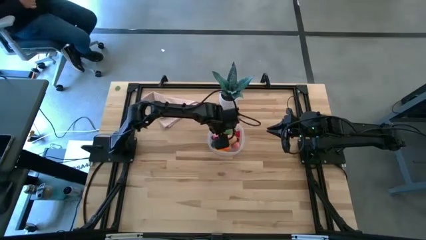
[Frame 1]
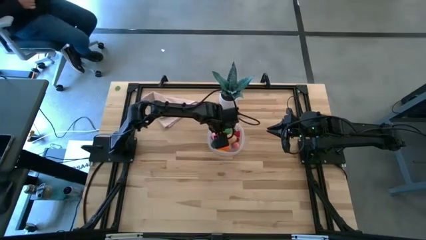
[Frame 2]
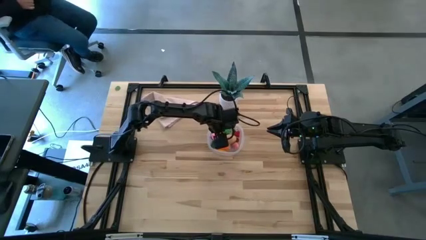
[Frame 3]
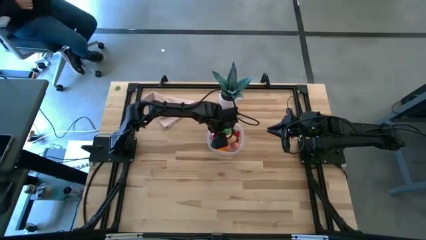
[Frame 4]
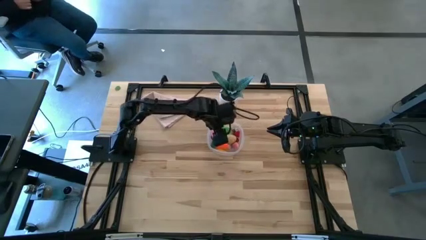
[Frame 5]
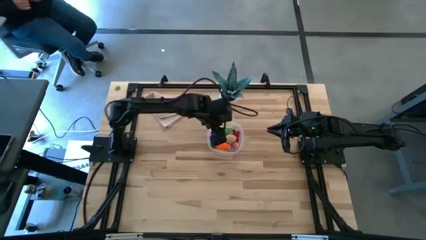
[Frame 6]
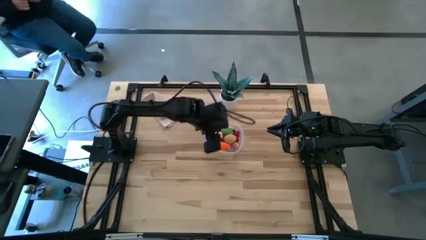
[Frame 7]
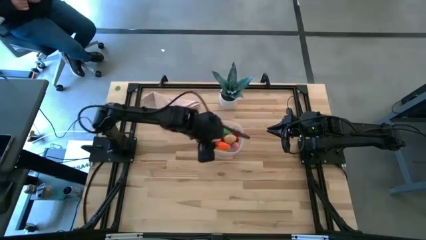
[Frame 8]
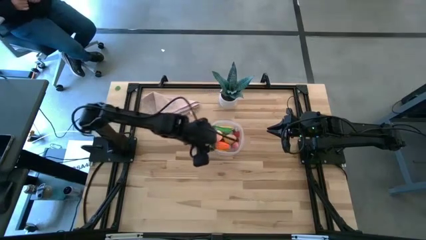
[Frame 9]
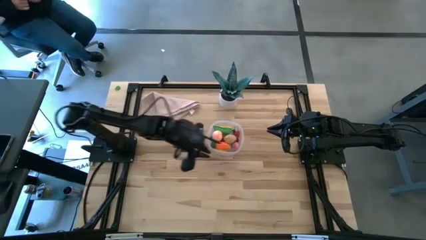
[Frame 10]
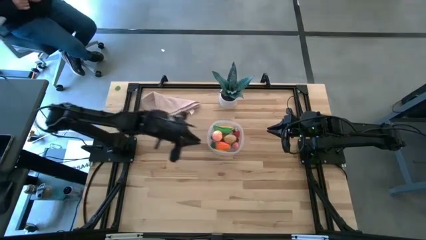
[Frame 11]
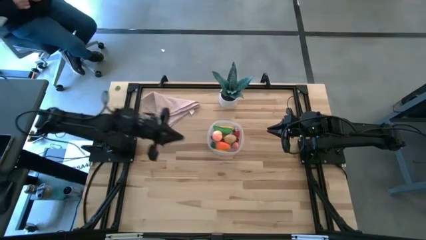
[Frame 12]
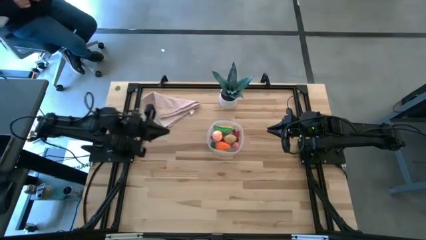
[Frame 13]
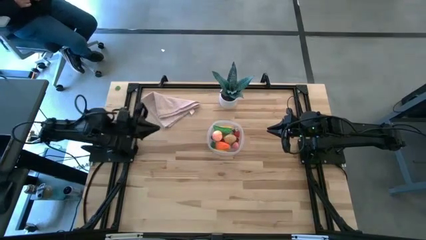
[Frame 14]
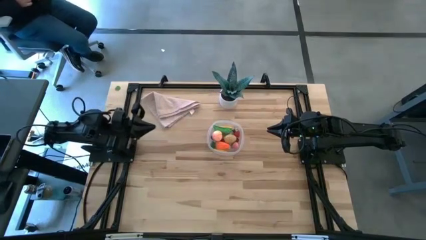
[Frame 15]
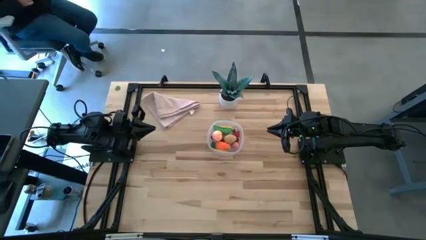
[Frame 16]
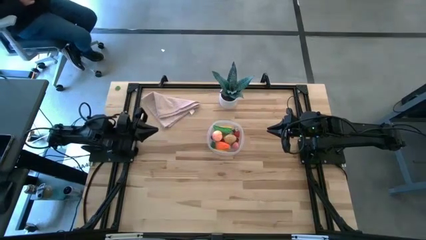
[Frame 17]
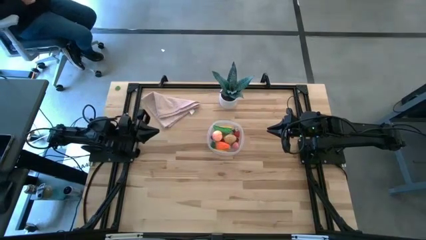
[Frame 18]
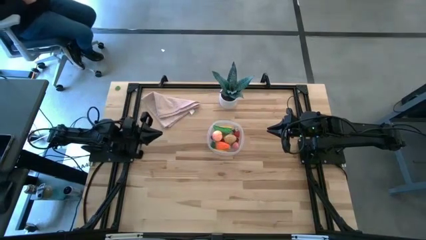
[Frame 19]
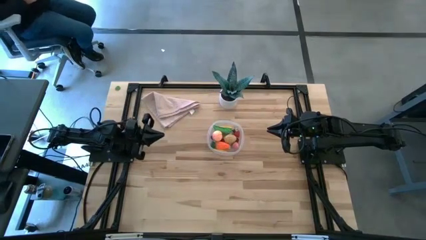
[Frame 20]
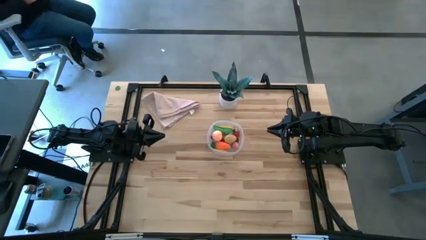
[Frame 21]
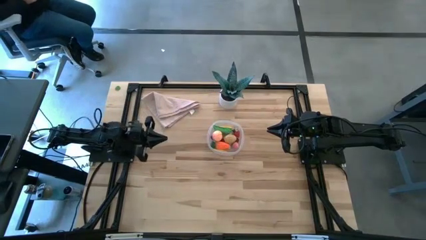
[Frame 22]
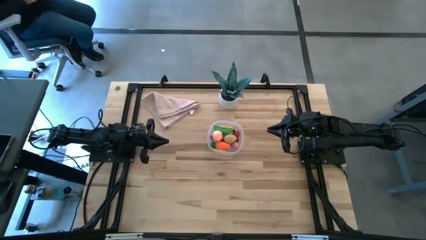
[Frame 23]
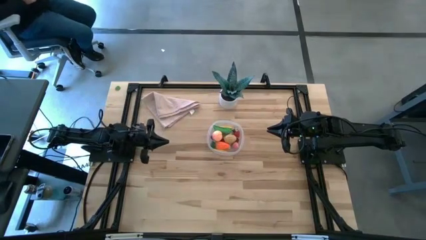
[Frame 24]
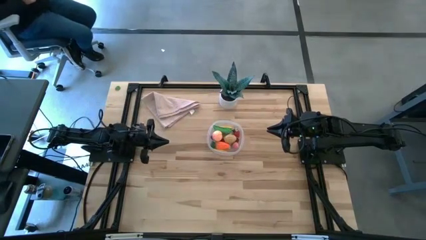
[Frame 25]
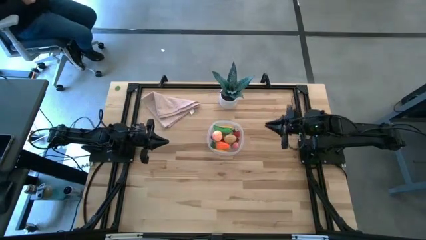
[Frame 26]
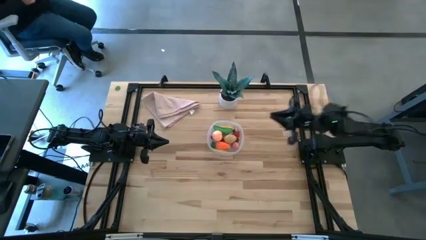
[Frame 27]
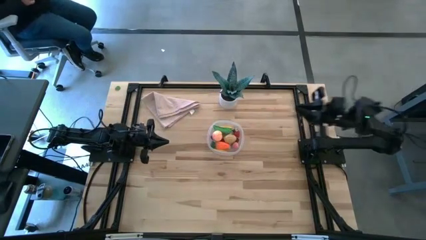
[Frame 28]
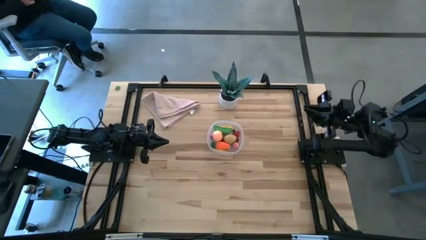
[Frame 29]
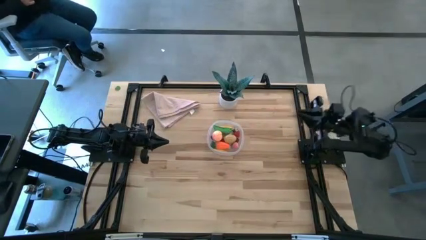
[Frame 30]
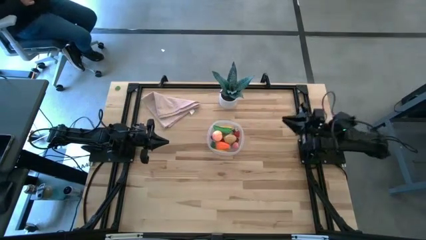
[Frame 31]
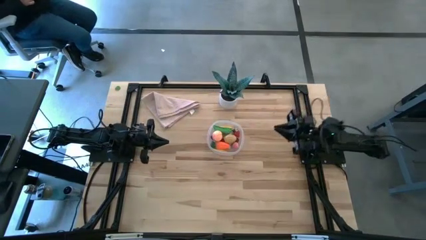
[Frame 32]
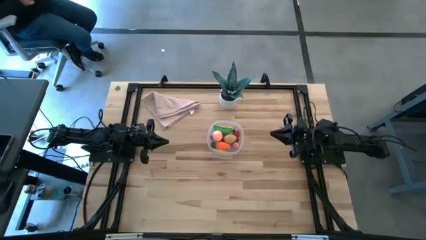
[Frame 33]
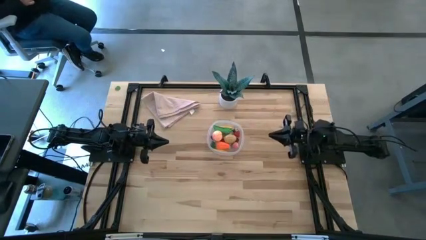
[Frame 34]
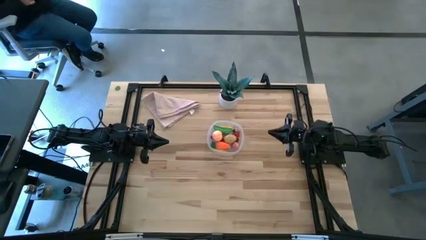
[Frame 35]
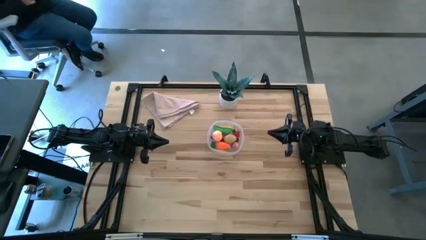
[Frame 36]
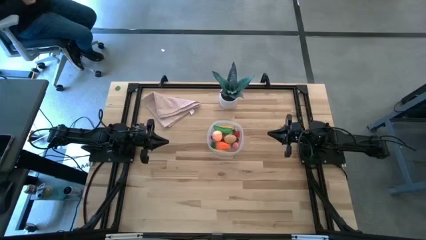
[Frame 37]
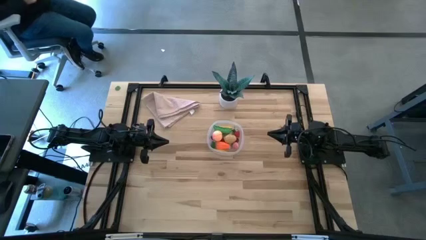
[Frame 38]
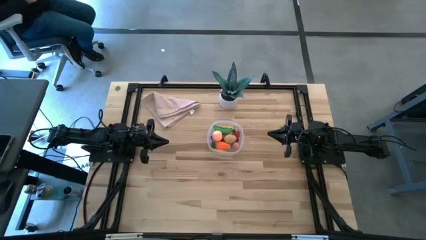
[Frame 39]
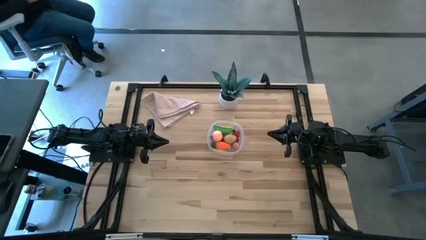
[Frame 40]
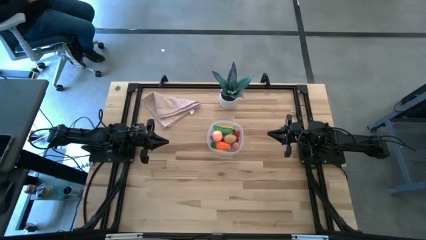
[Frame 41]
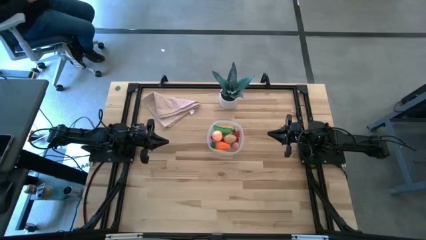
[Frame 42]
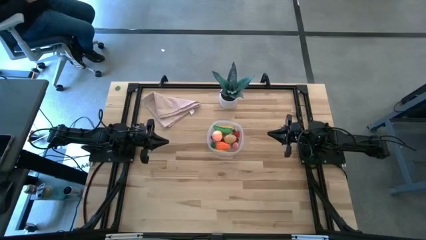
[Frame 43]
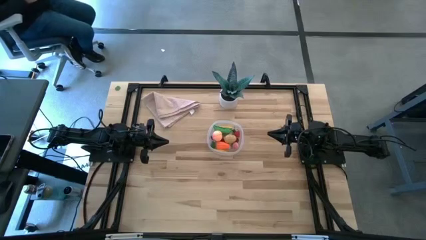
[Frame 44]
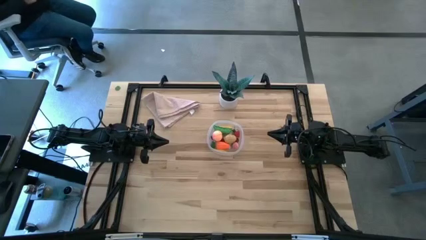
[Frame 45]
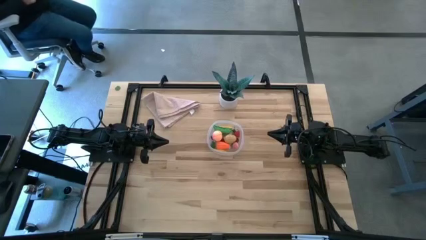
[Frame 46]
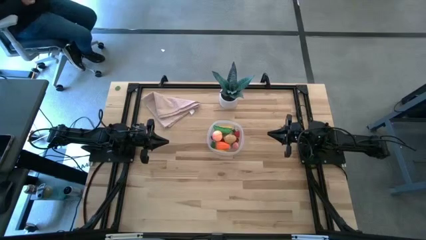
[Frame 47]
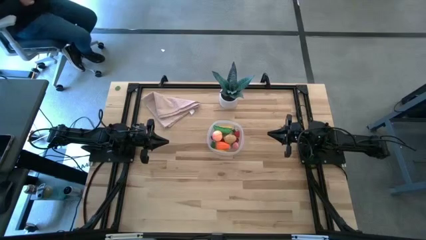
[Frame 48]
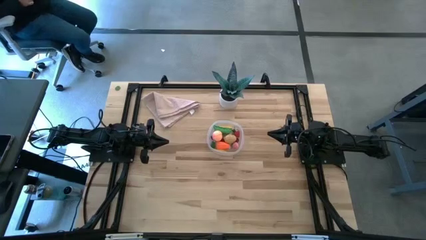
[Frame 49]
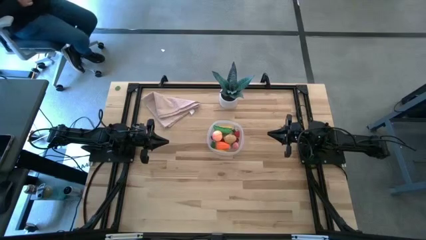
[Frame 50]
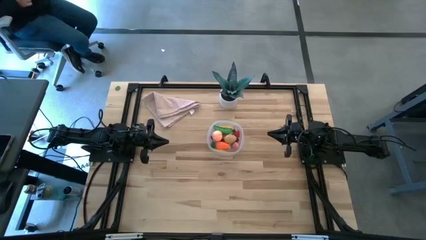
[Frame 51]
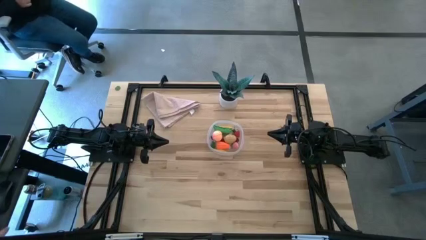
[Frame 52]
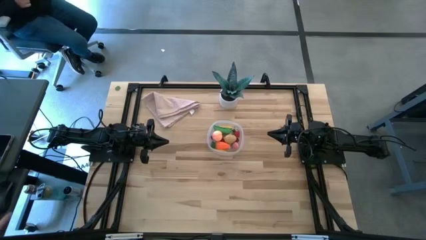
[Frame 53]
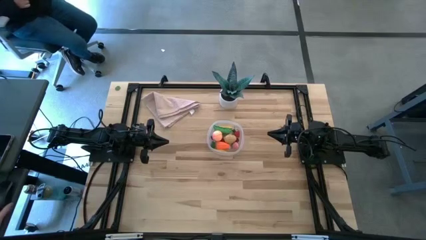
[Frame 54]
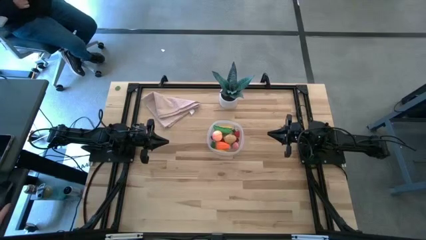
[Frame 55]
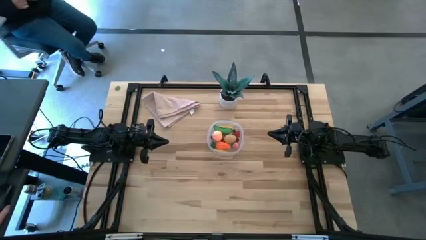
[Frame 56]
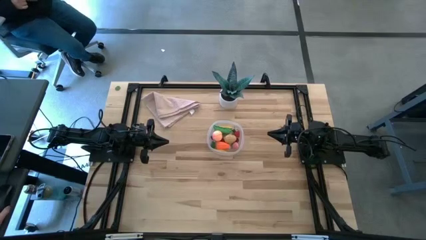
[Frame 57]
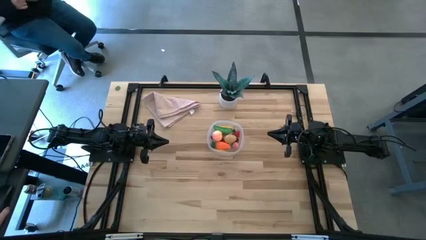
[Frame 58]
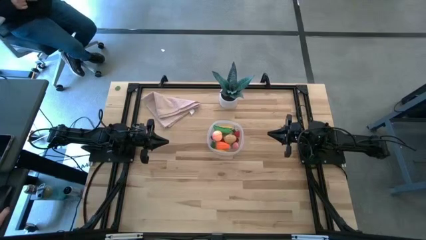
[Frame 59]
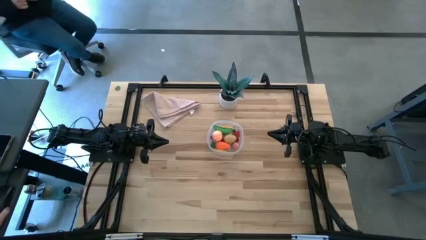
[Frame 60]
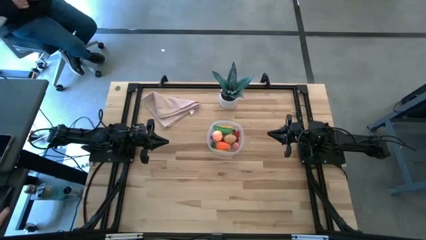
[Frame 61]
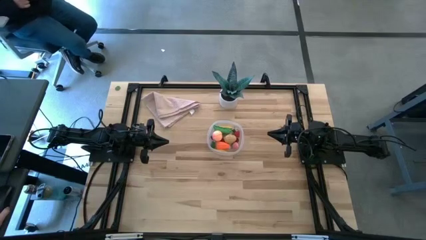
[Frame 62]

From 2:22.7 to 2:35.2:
Task: Pick and placing Produce into tupperware
Return to Home Position
